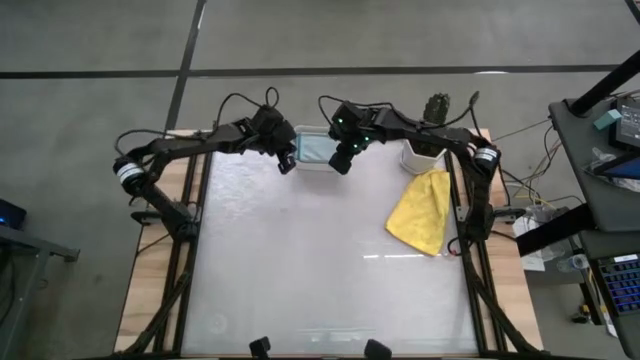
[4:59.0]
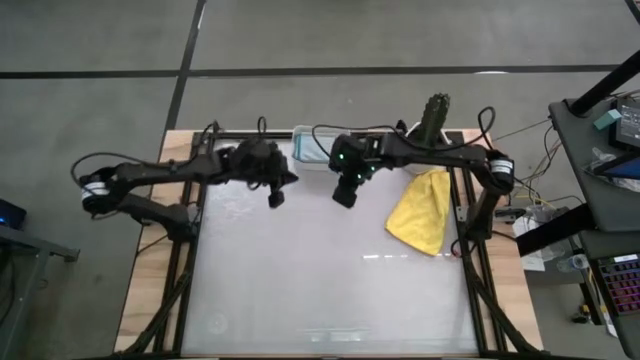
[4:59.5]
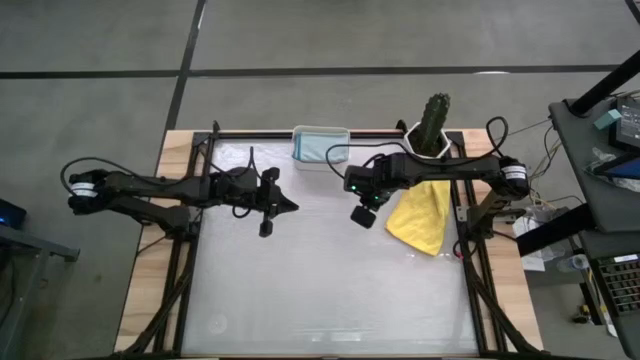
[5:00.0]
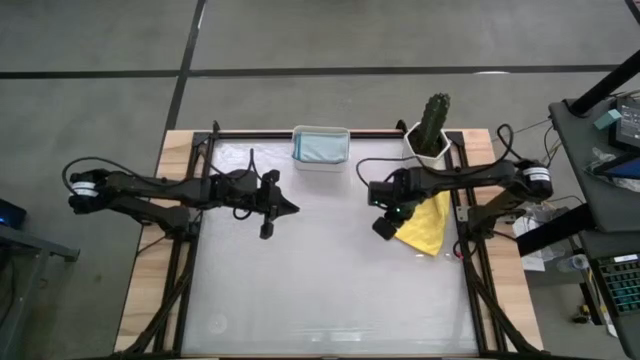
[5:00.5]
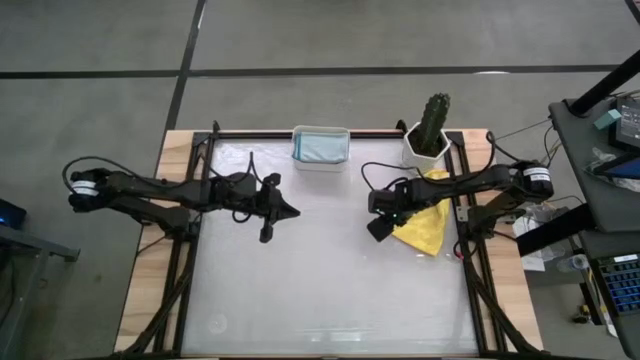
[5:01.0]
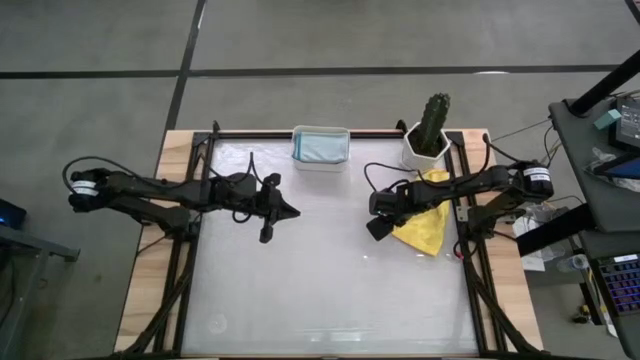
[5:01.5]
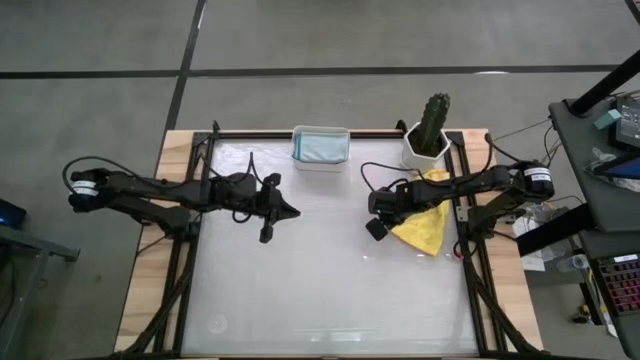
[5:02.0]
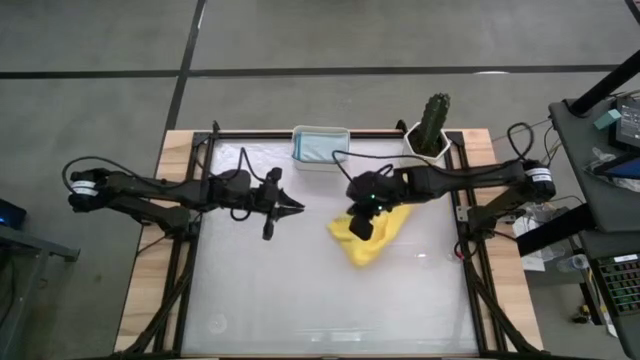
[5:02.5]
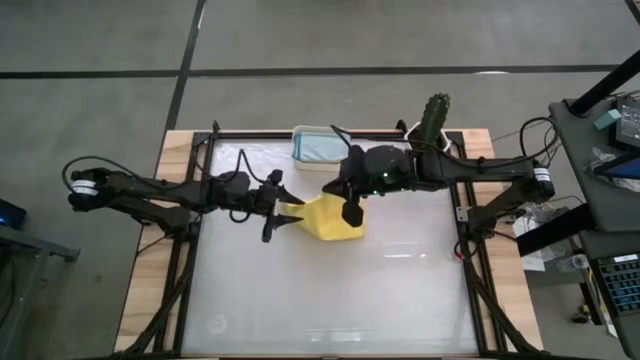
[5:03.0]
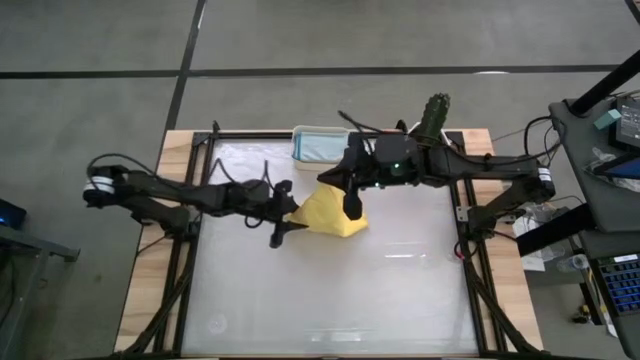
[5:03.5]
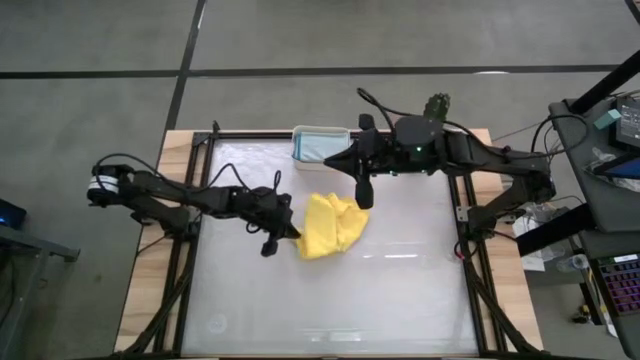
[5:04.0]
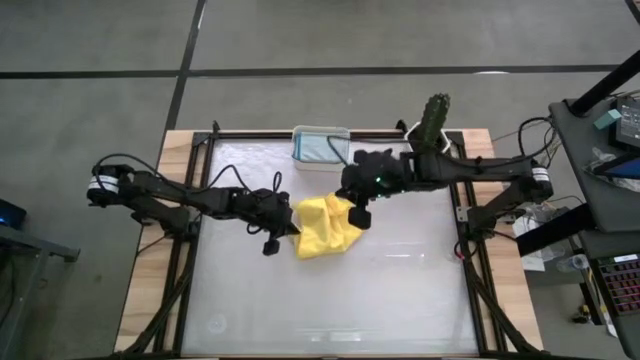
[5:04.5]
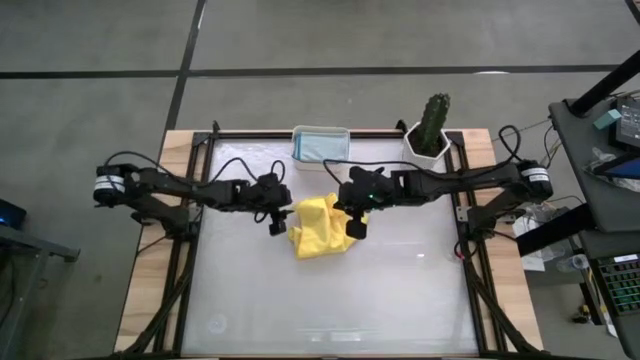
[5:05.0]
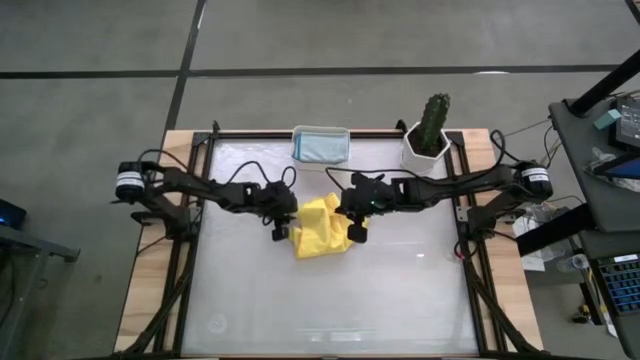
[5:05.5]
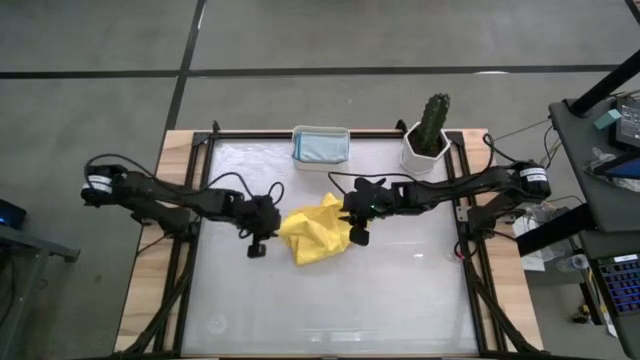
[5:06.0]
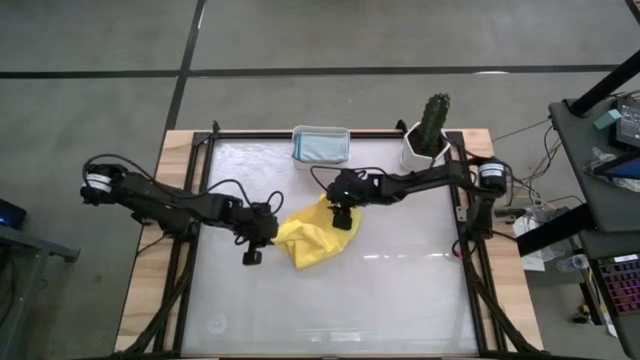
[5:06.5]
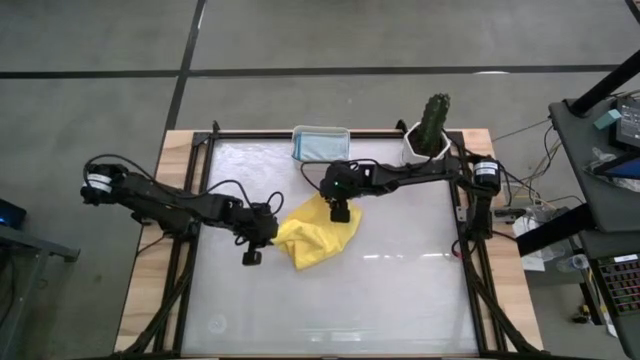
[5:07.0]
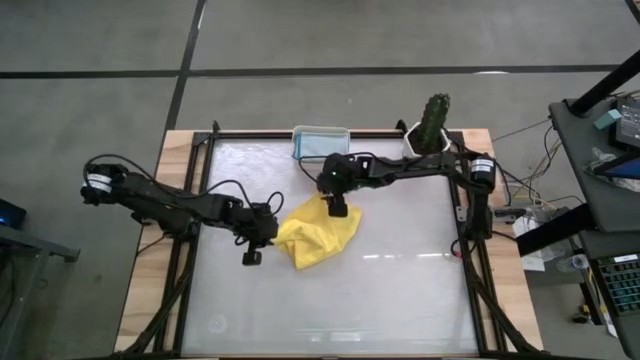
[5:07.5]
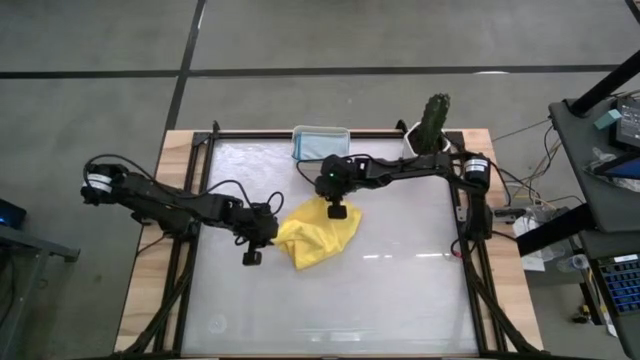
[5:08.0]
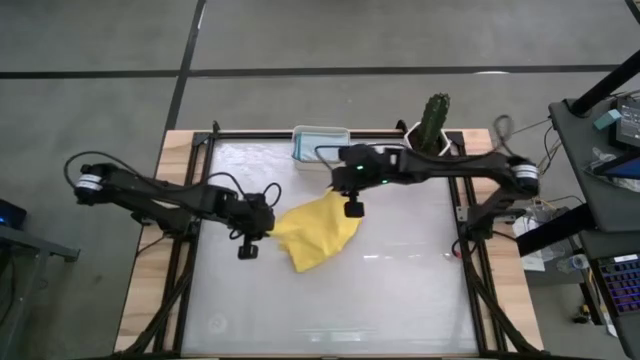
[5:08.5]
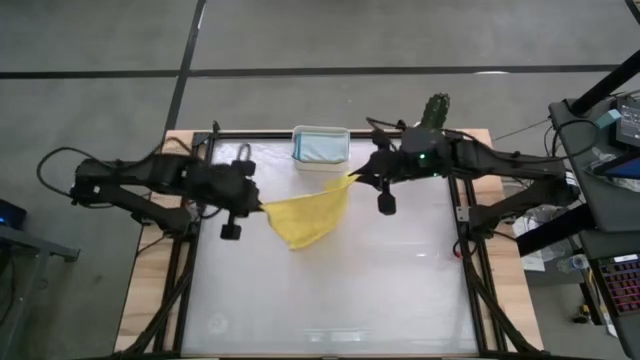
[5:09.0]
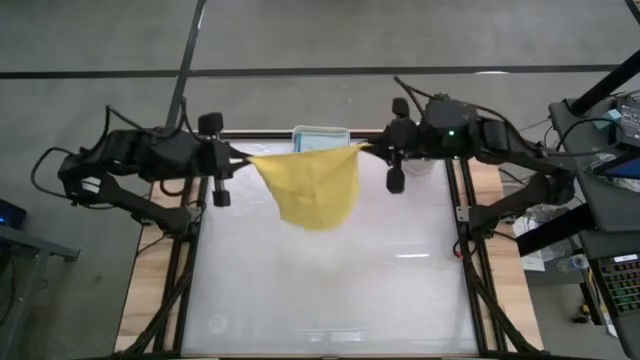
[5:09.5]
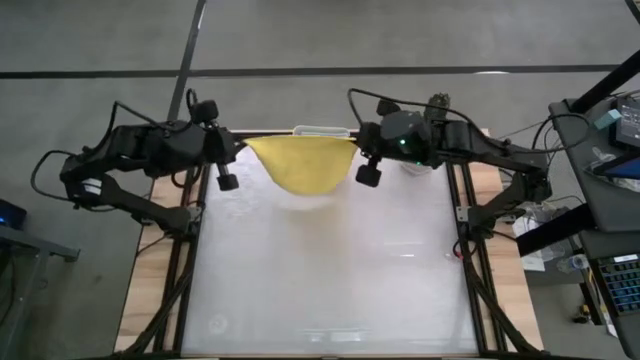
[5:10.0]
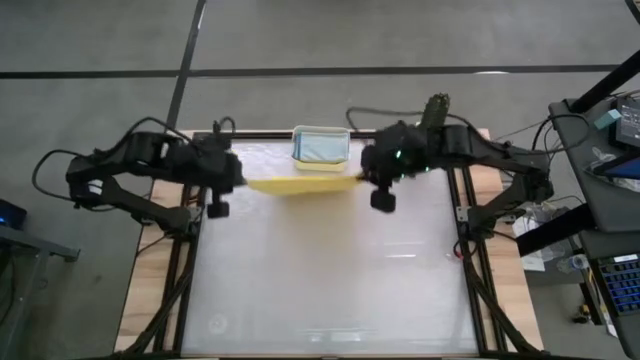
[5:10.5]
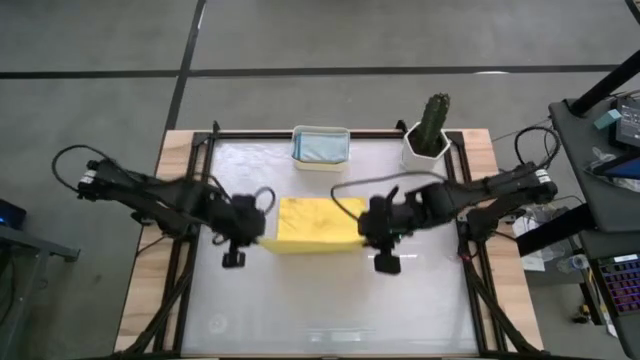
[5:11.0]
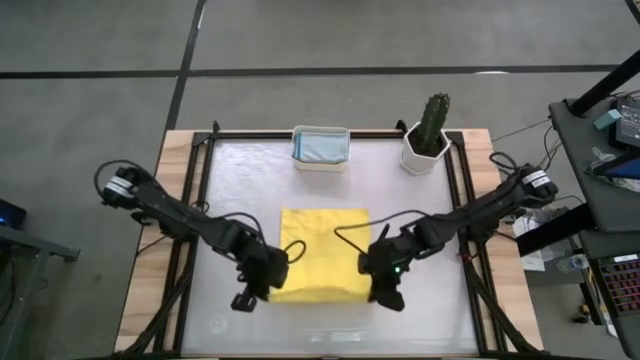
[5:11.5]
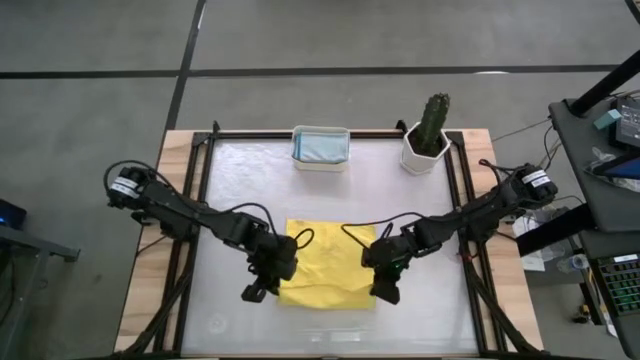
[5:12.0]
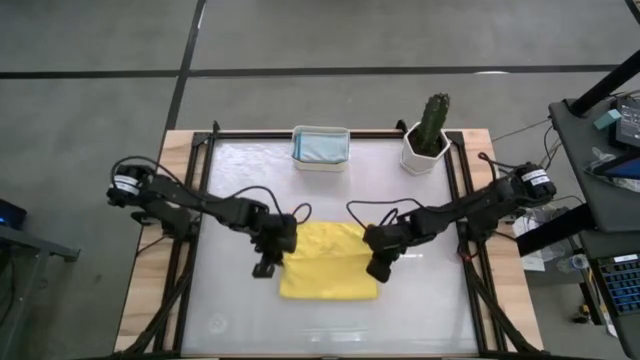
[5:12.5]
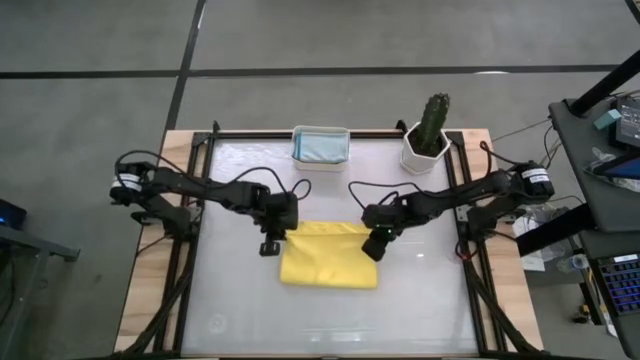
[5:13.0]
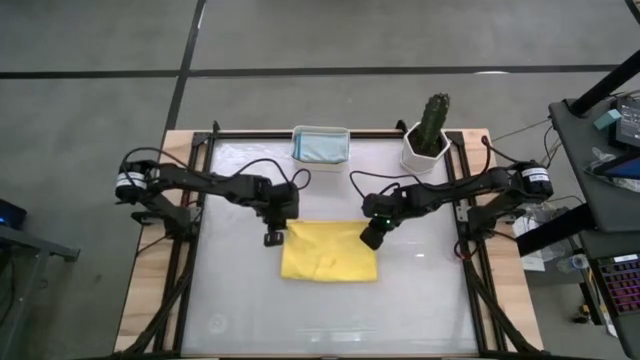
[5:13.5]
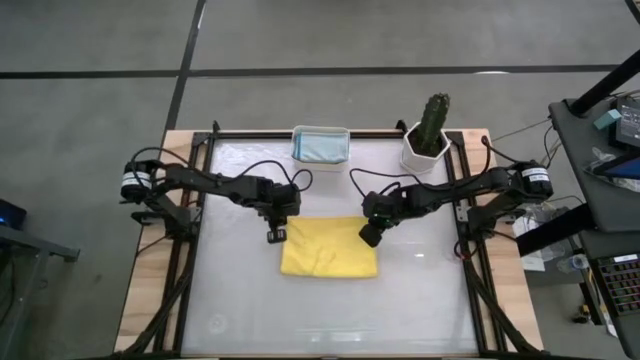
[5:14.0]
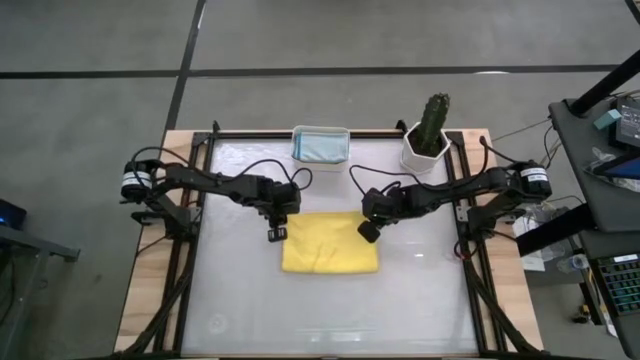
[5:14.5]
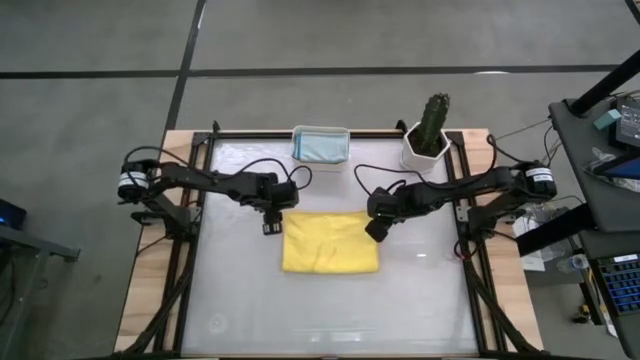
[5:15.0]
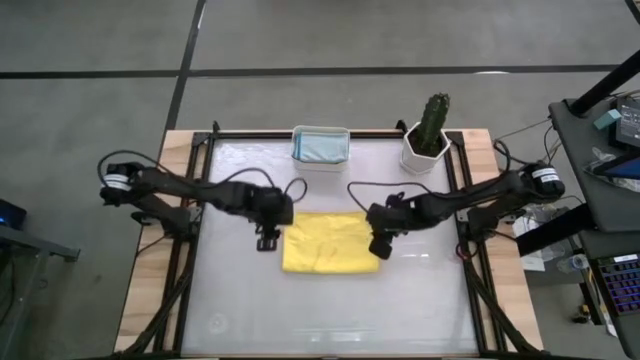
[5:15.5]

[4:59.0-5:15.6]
Task: Fold microfiber towels
Fold the yellow cloth
